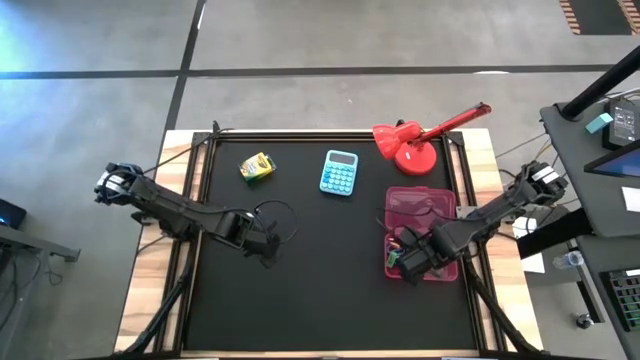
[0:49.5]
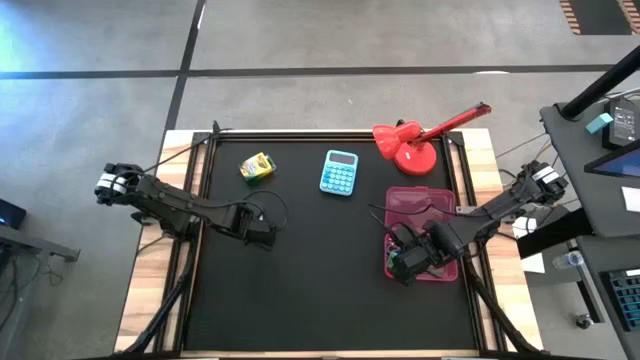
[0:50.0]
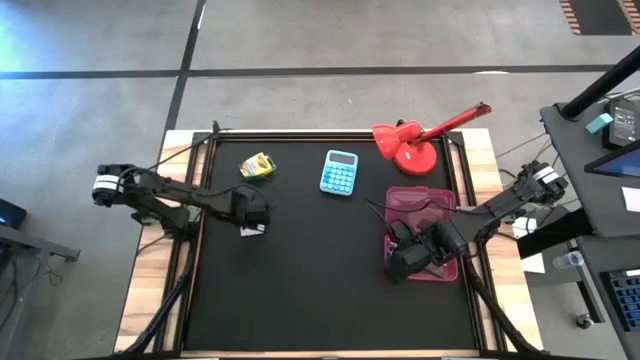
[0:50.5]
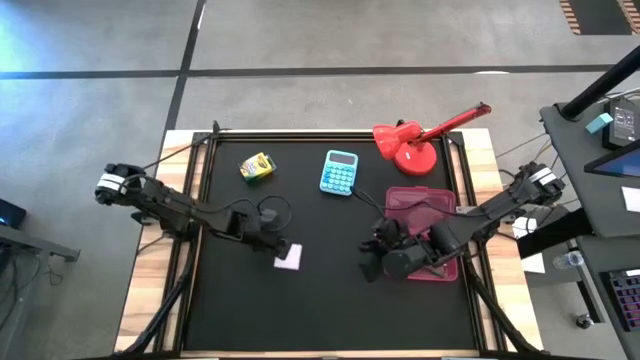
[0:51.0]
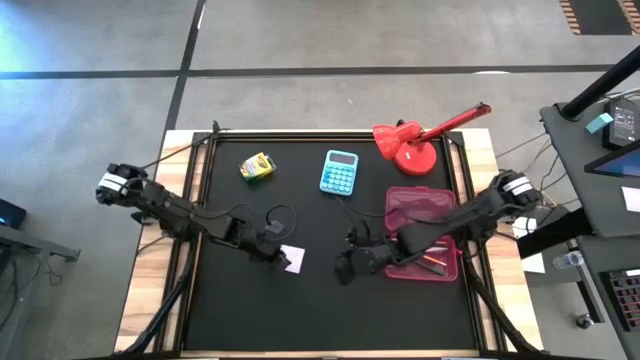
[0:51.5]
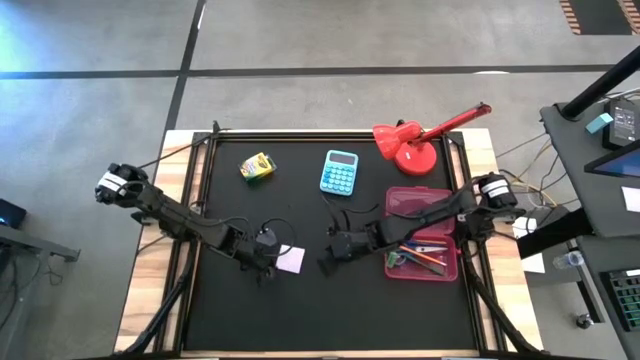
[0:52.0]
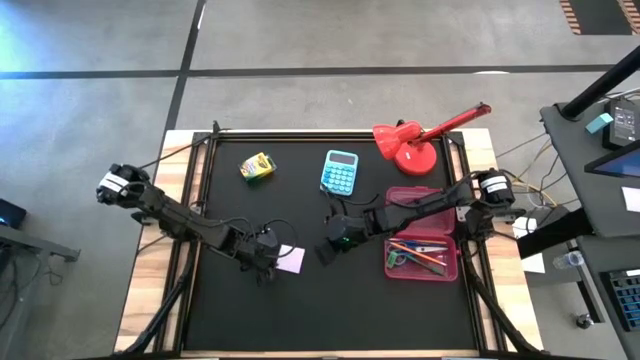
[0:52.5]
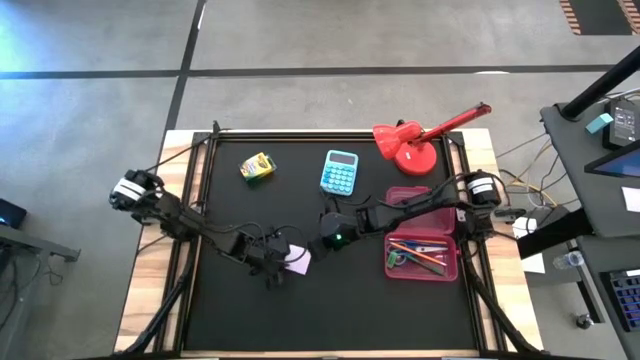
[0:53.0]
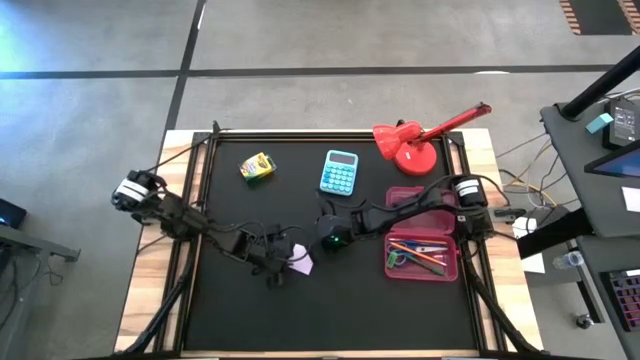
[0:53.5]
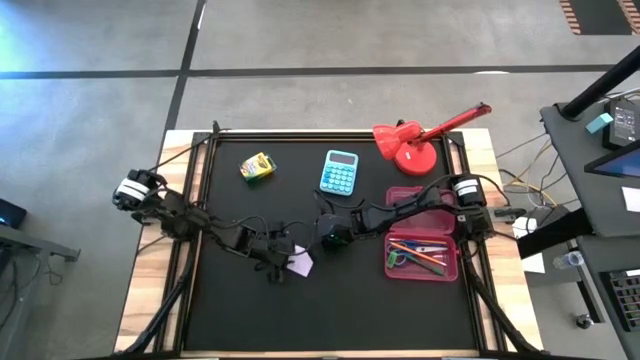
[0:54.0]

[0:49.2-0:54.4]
Task: Pack school essentials
Put the white sticky notes into the pink supply box

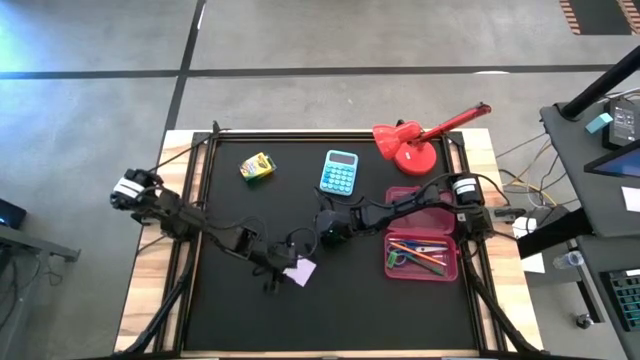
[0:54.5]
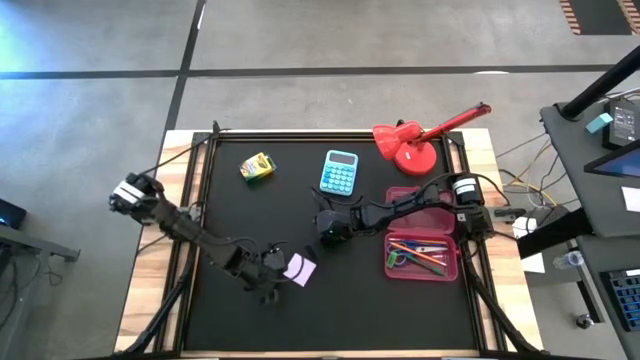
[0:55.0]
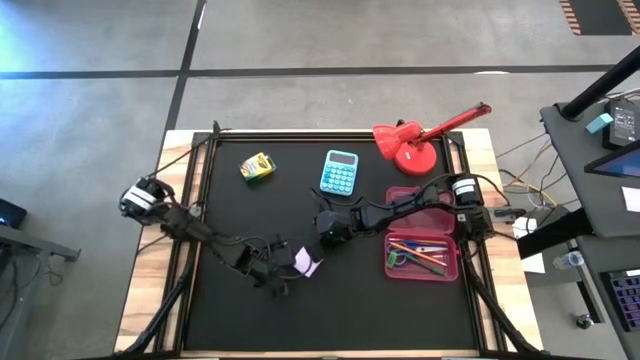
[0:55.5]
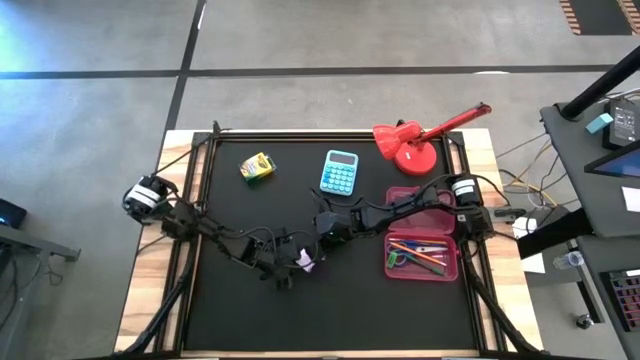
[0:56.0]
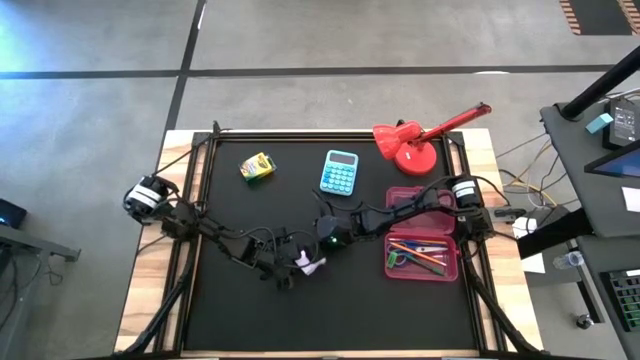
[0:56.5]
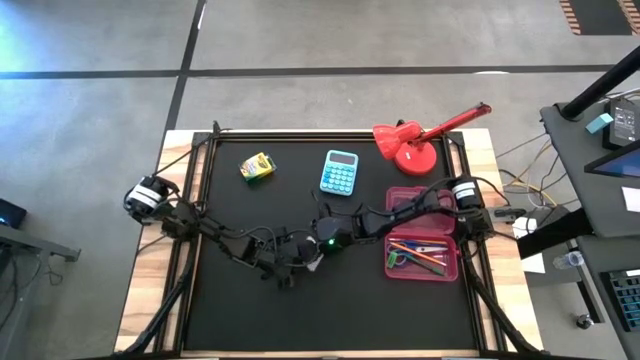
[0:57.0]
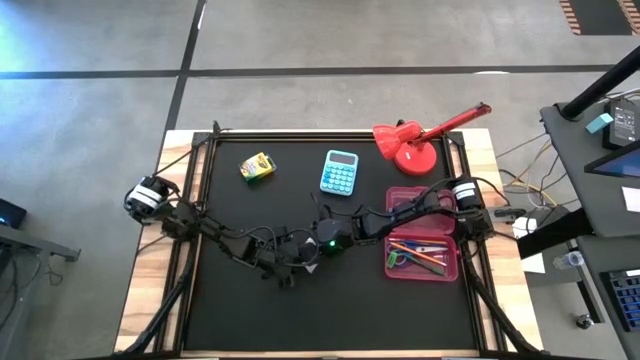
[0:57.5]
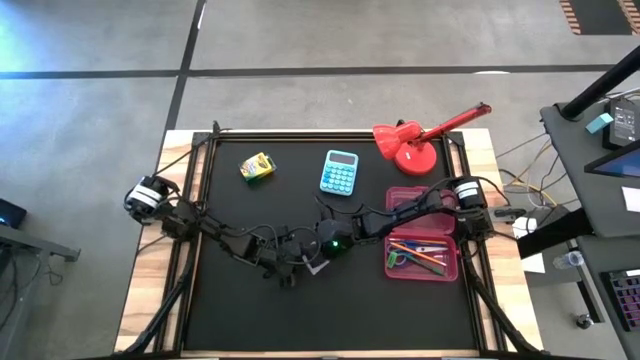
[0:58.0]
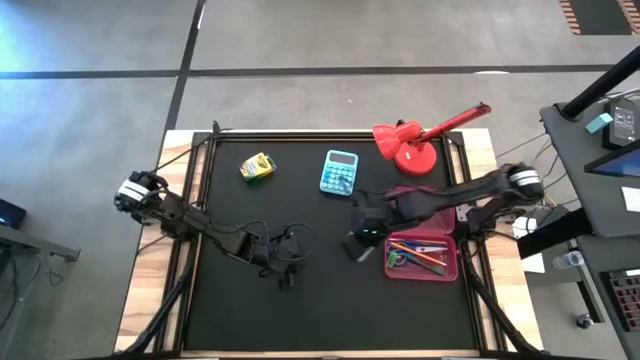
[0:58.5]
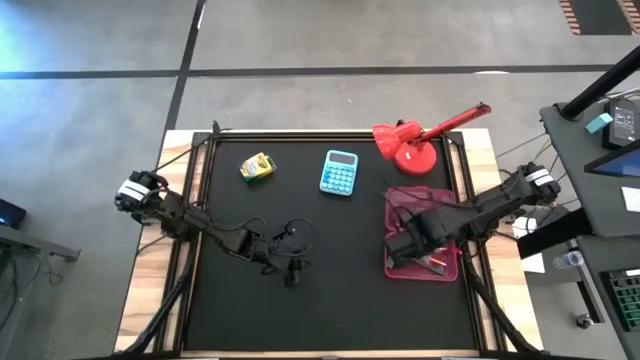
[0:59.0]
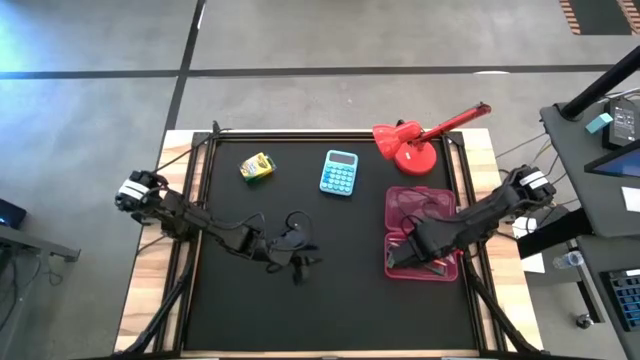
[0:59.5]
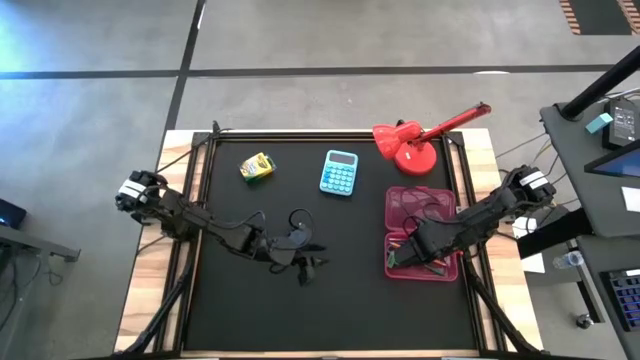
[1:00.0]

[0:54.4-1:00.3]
Put the white sticky notes into the pink supply box

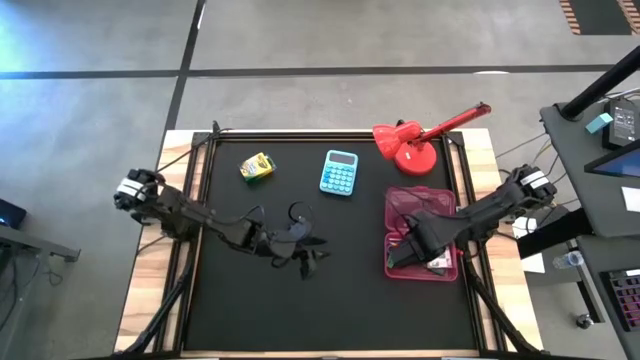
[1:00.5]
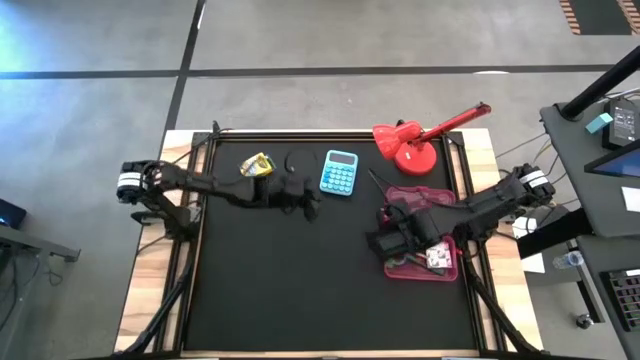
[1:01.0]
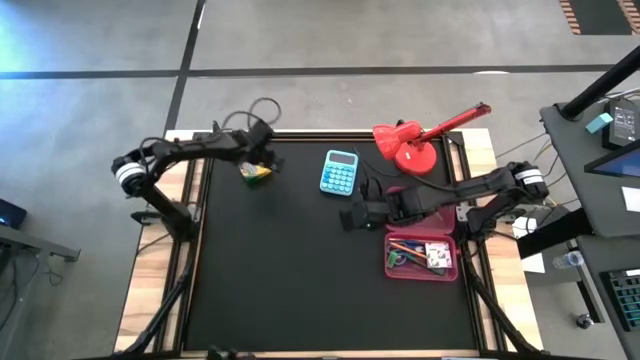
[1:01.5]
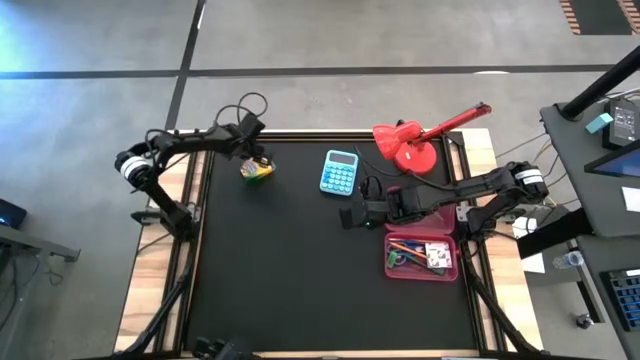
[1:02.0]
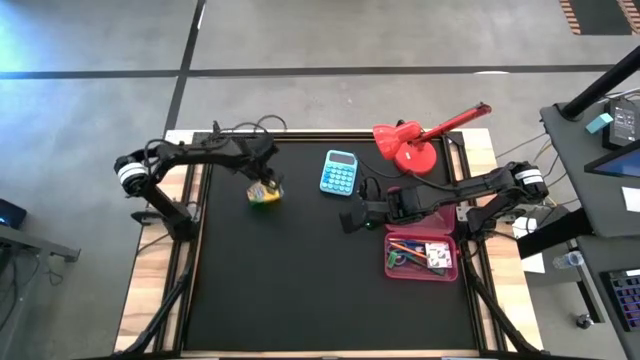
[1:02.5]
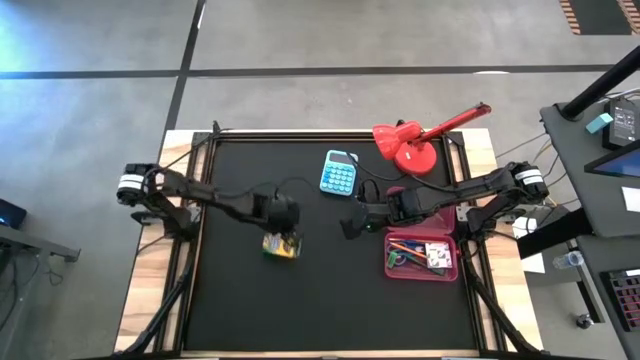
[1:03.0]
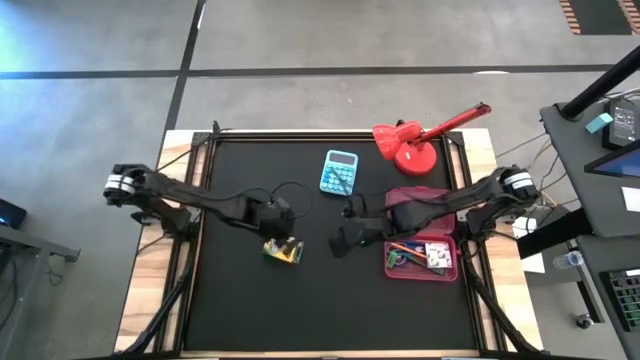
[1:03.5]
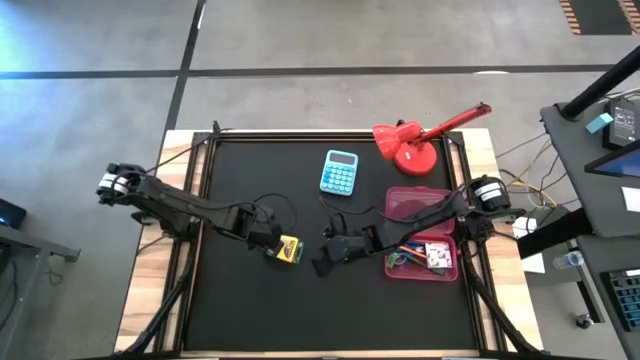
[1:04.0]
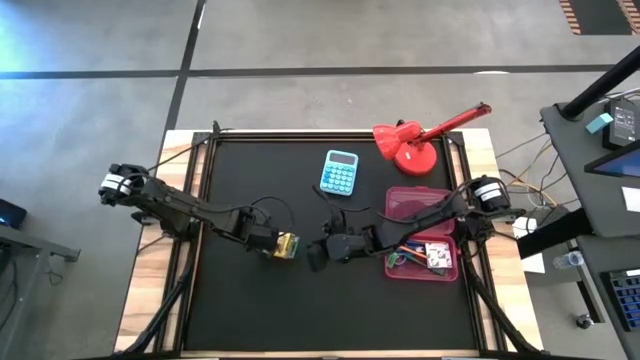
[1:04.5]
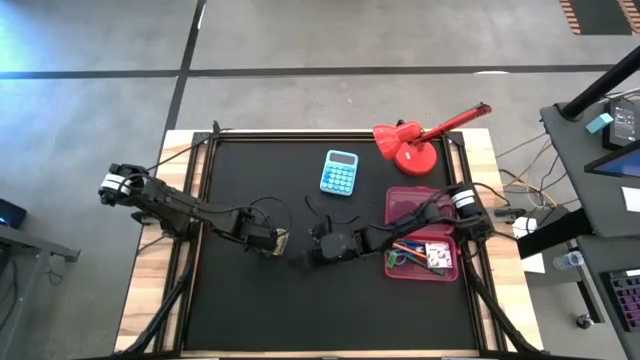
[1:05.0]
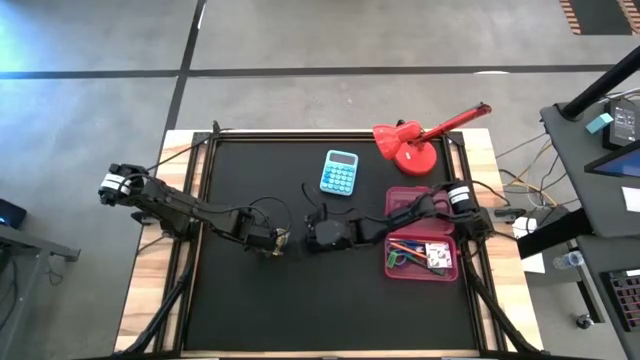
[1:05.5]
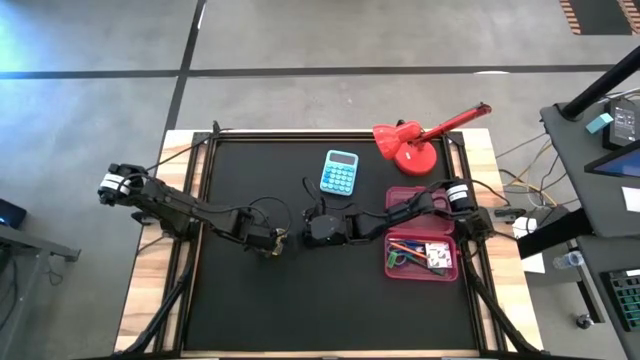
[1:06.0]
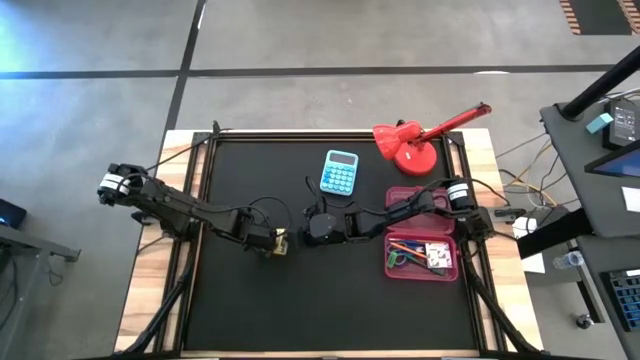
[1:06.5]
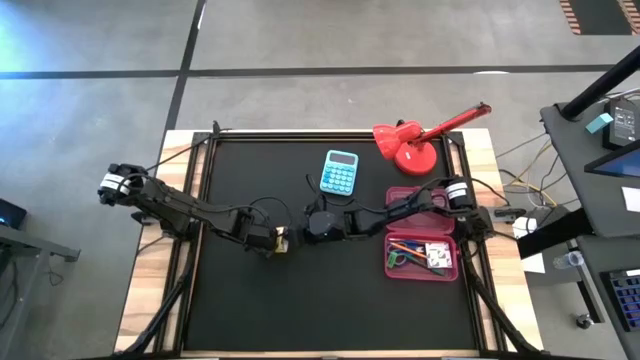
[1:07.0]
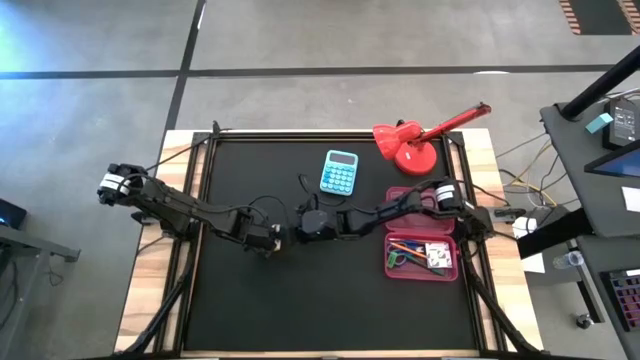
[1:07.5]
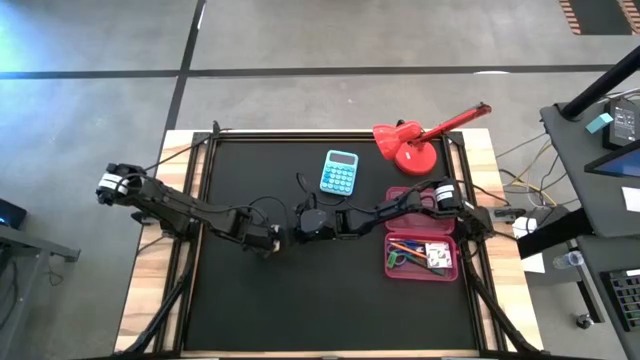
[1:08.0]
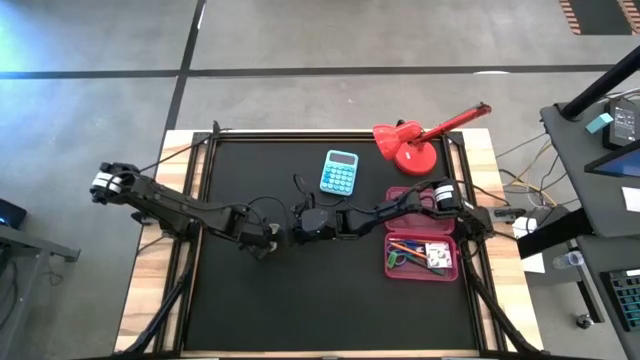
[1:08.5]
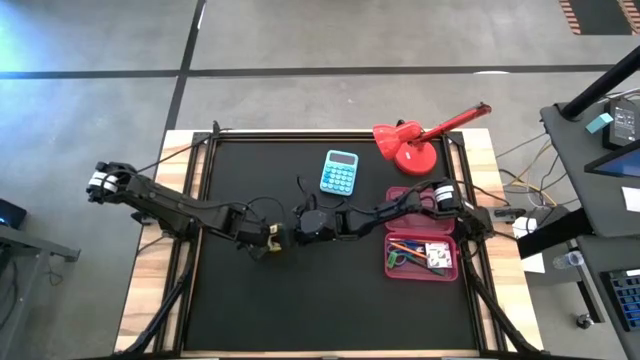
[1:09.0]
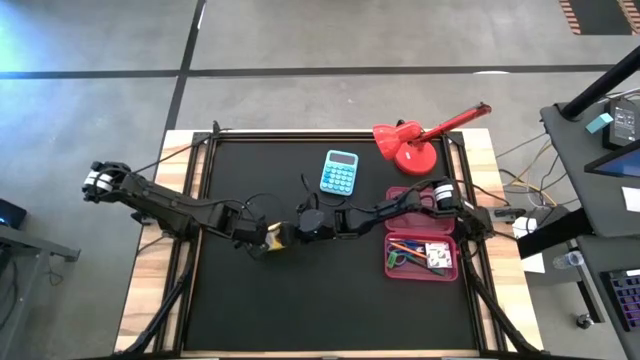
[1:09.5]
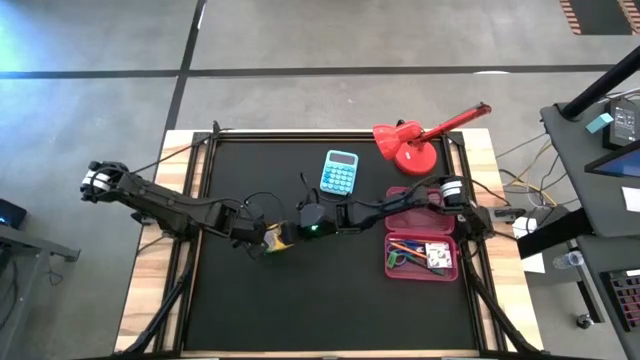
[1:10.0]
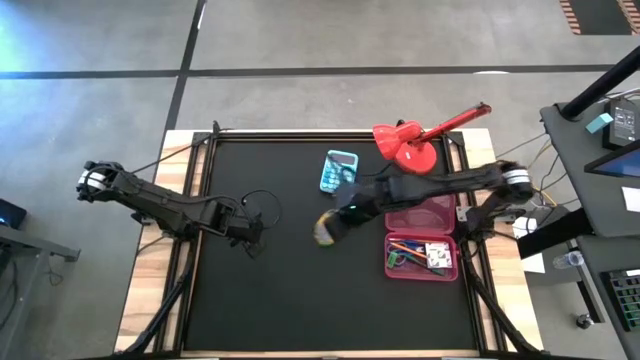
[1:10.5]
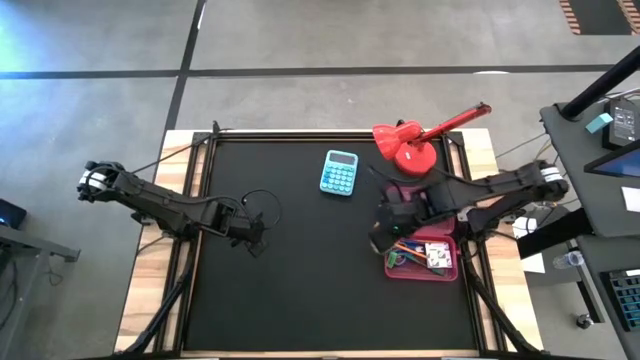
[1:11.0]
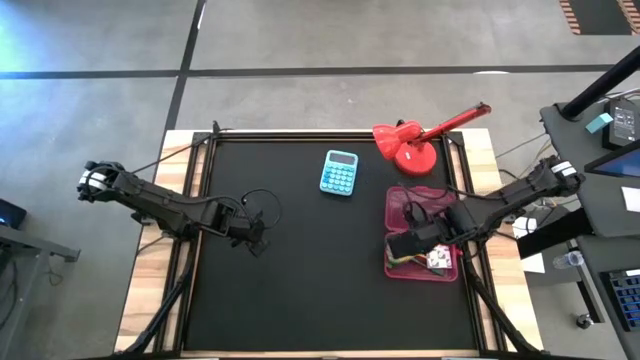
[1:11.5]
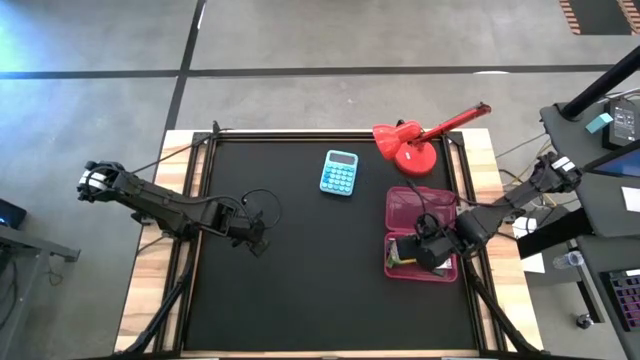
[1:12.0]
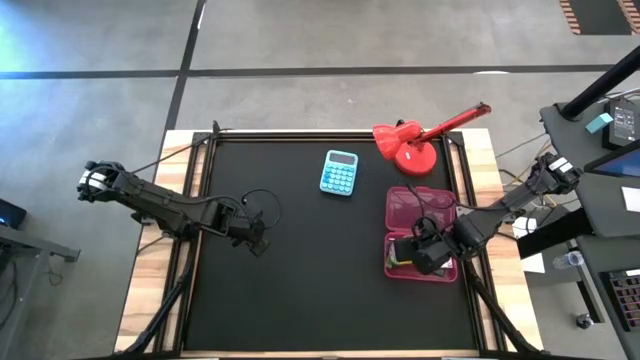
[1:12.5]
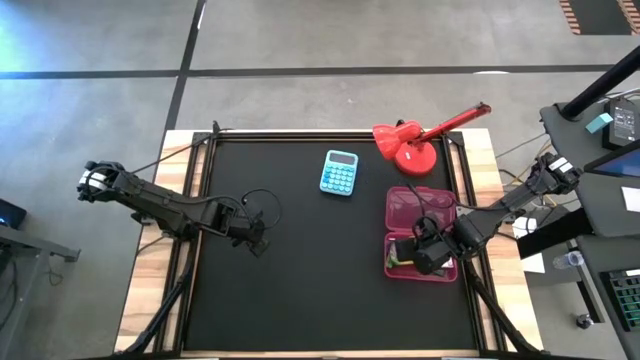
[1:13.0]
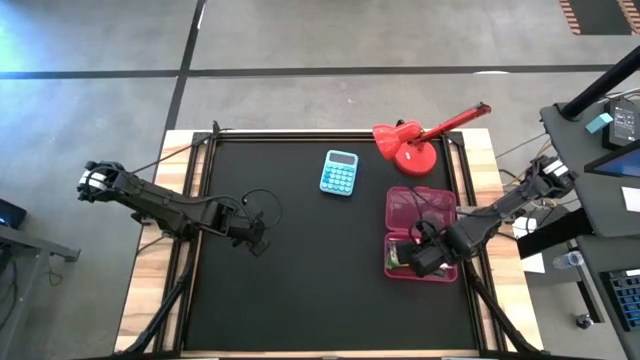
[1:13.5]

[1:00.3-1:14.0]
Put the yellow crayons box into the pink supply box
